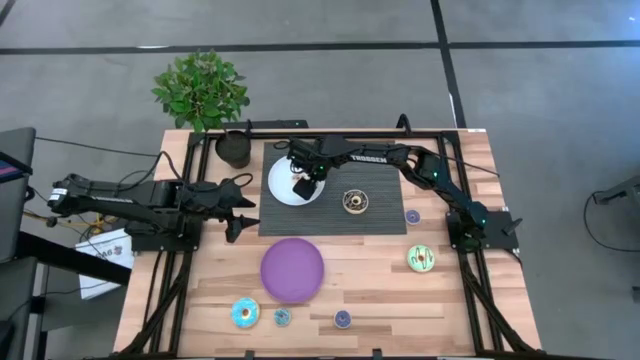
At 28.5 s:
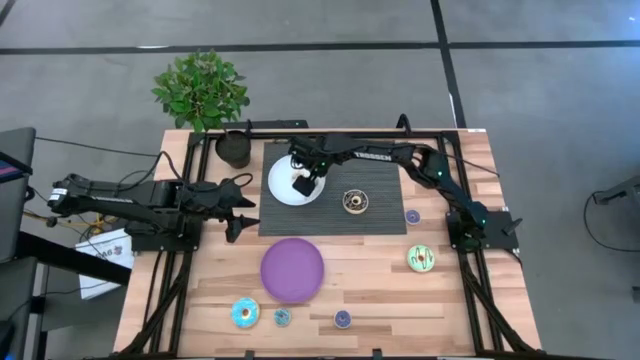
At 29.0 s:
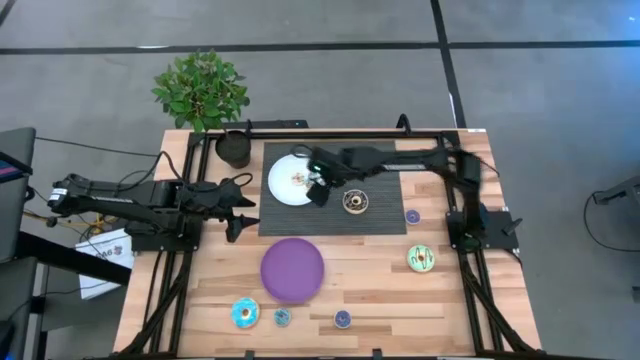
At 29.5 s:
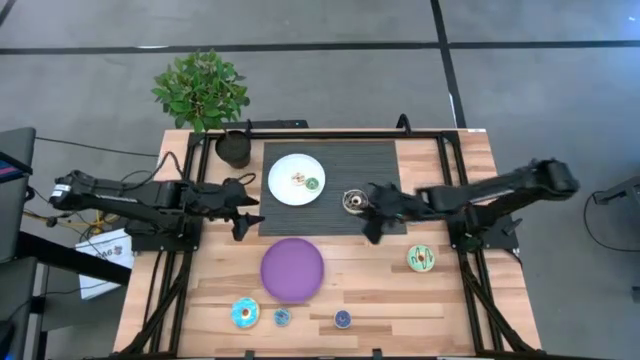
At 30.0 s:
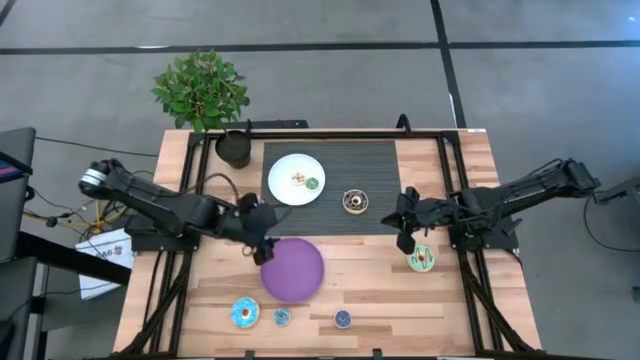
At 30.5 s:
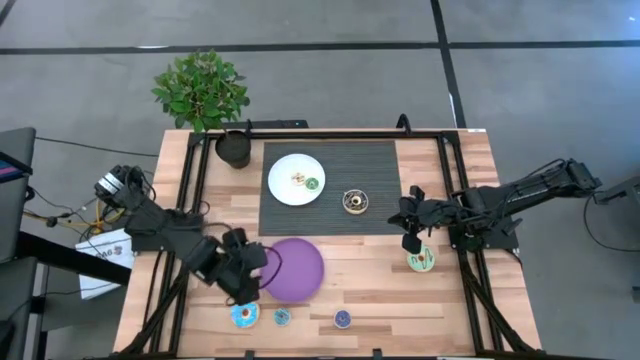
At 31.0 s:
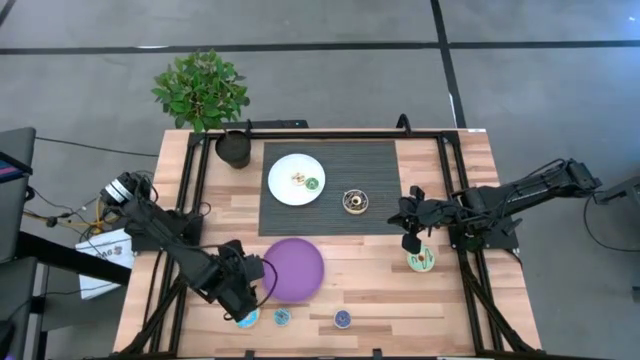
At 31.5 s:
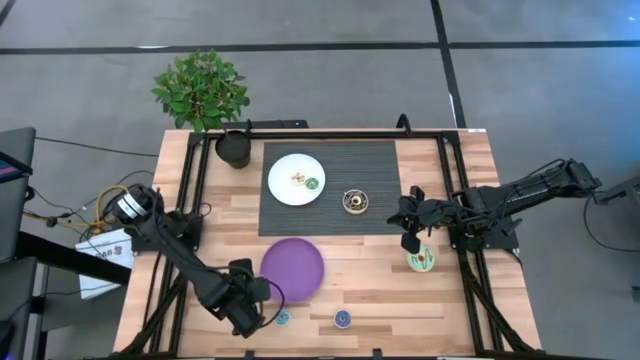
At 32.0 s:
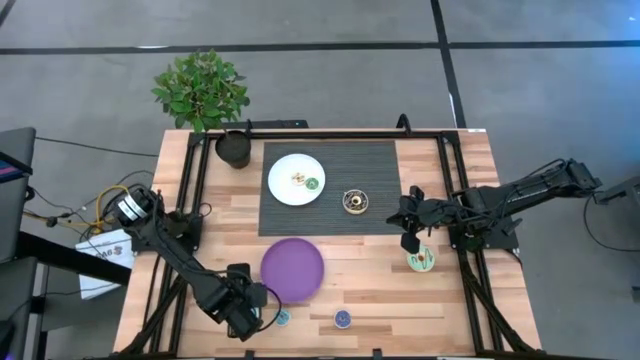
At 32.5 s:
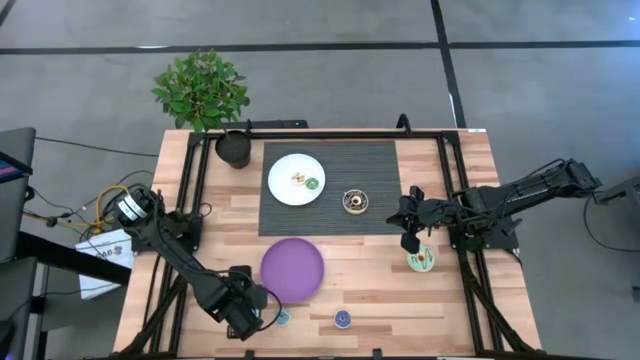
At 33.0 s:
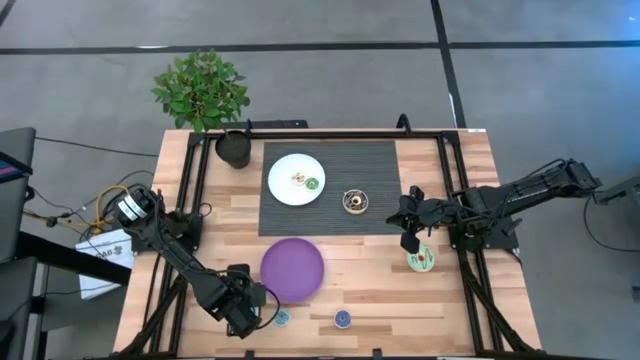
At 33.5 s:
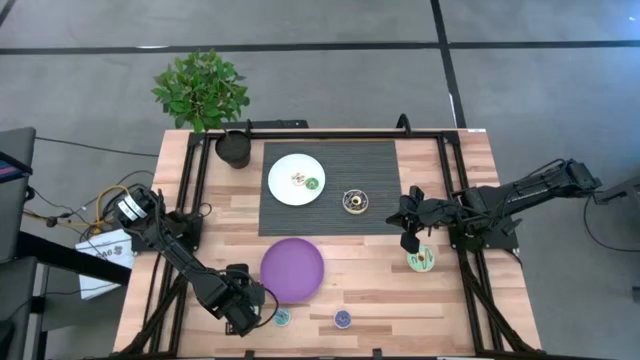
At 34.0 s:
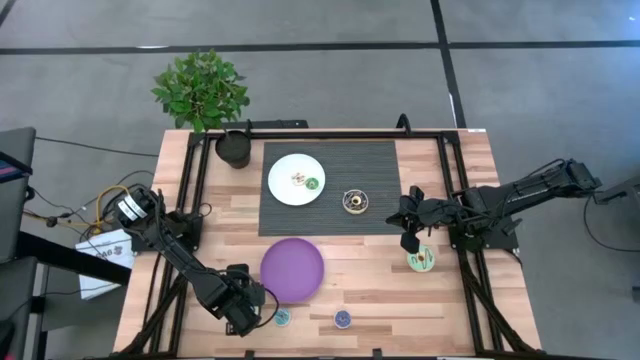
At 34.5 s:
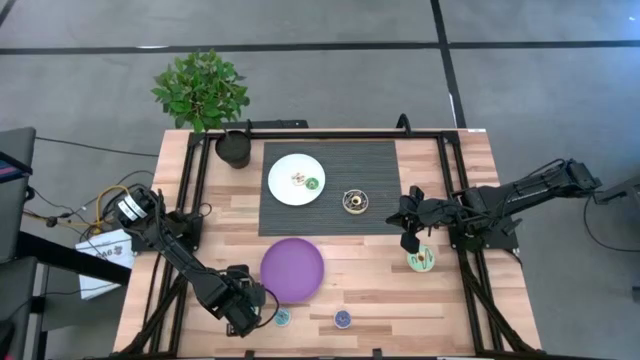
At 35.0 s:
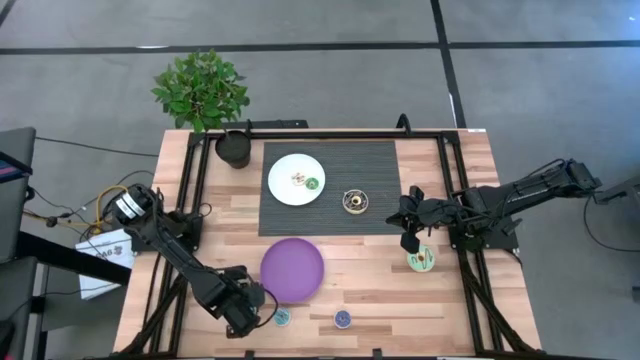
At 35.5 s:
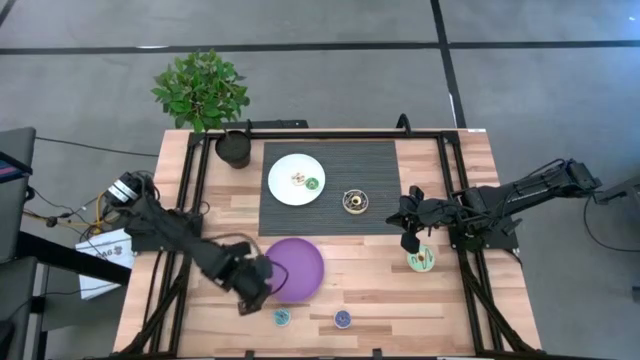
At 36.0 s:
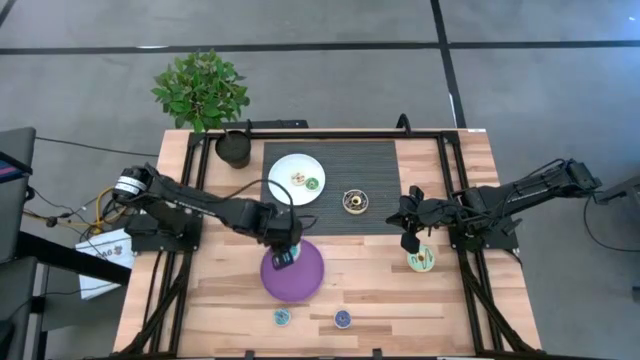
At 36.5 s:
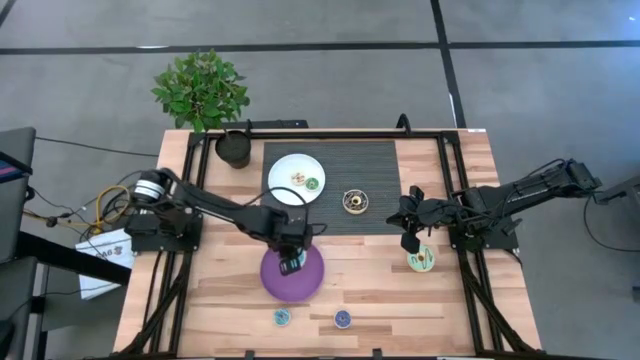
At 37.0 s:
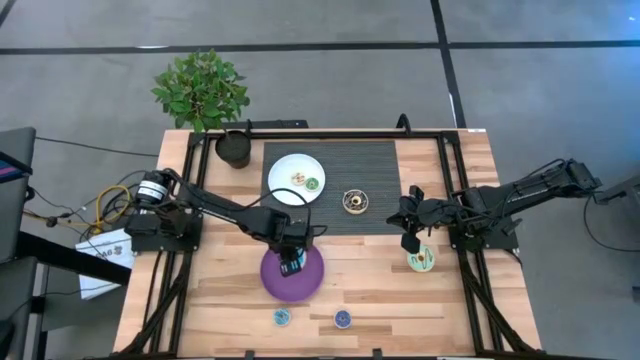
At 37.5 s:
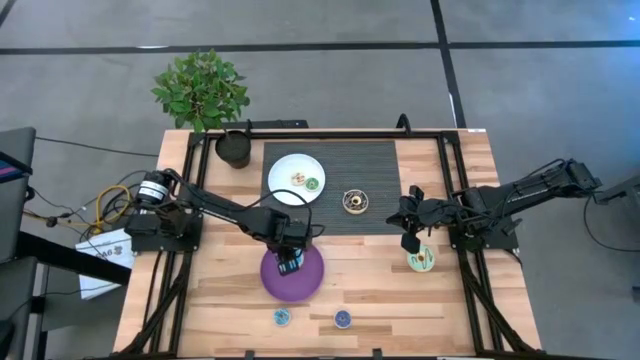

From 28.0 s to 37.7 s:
Task: Pick & Place donuts
Put the large light blue donut on the purple plate

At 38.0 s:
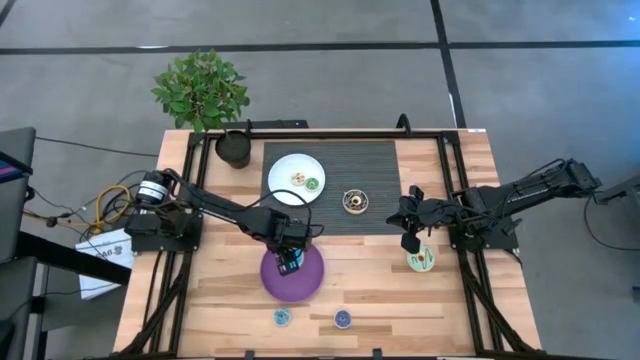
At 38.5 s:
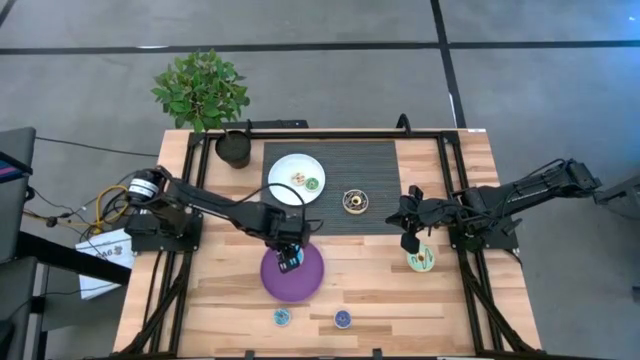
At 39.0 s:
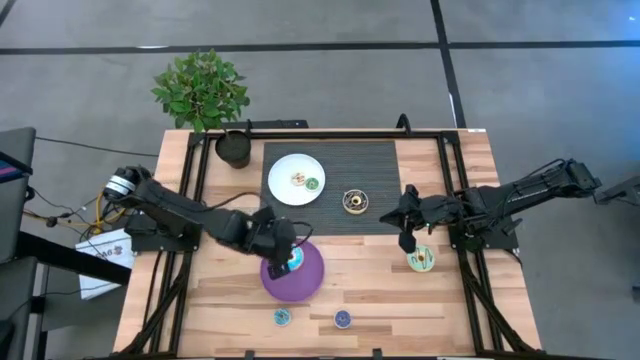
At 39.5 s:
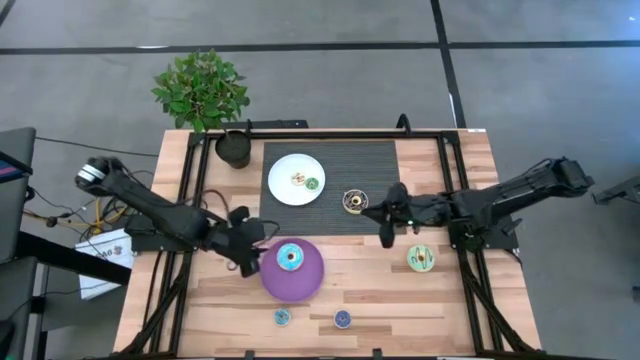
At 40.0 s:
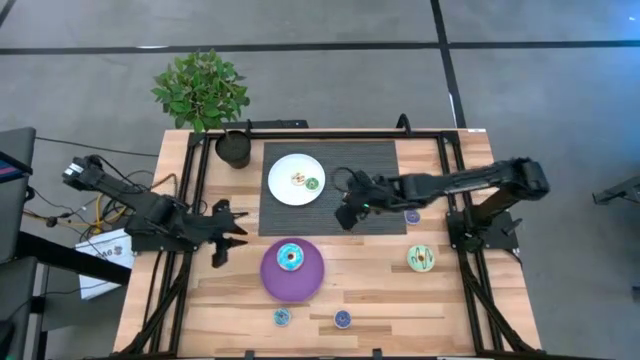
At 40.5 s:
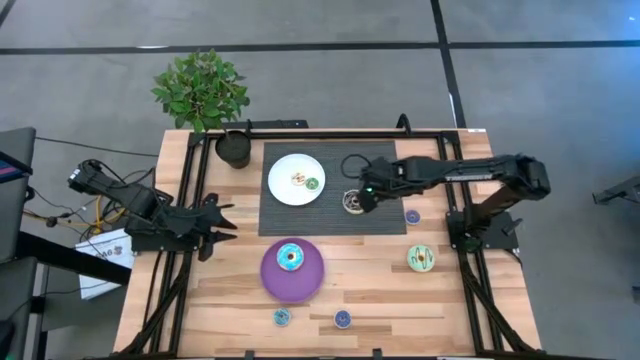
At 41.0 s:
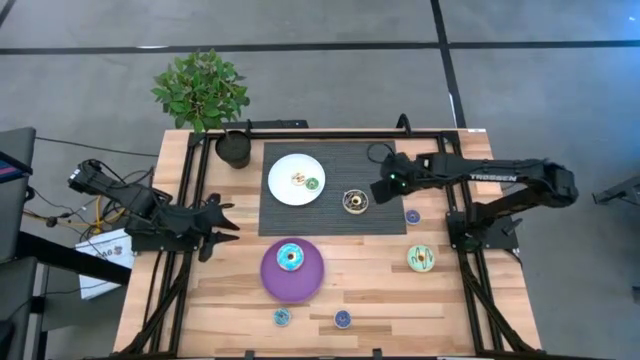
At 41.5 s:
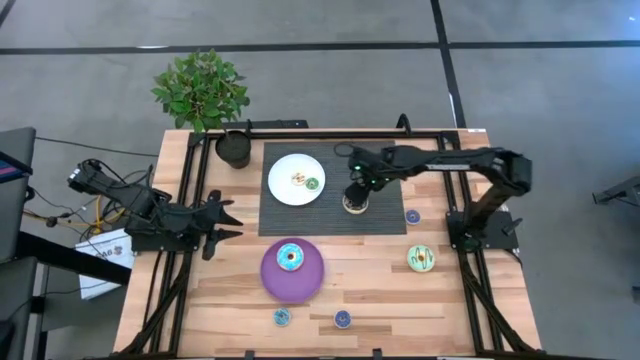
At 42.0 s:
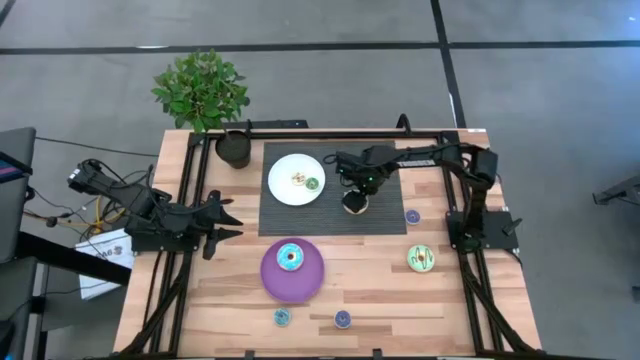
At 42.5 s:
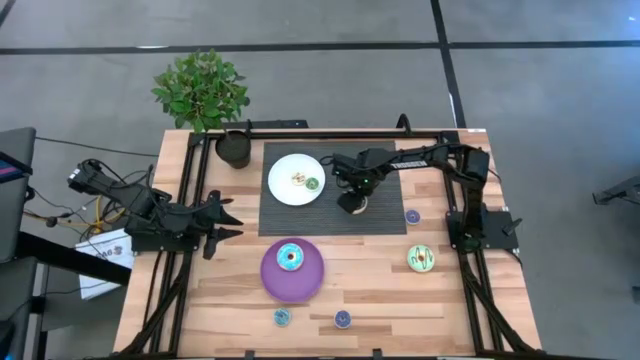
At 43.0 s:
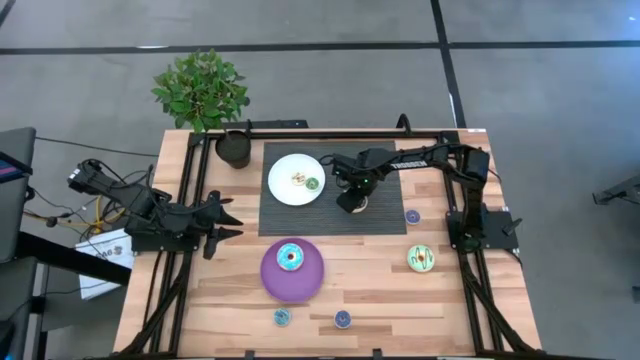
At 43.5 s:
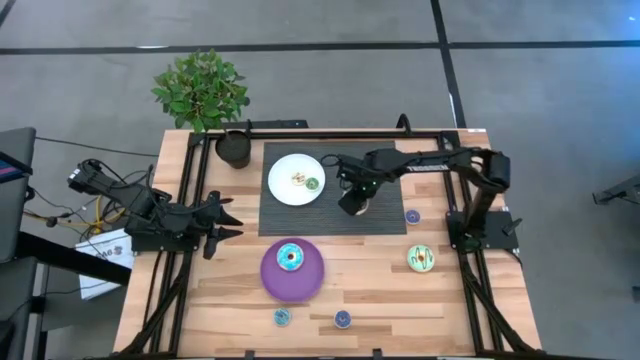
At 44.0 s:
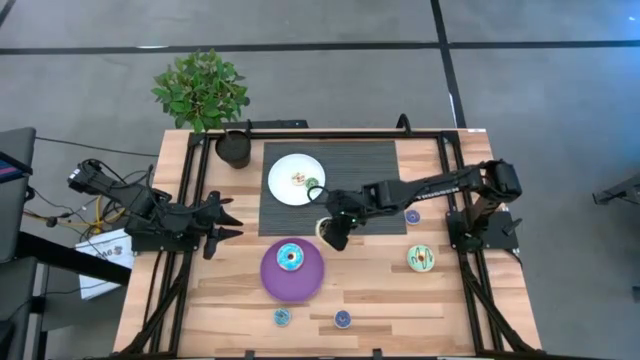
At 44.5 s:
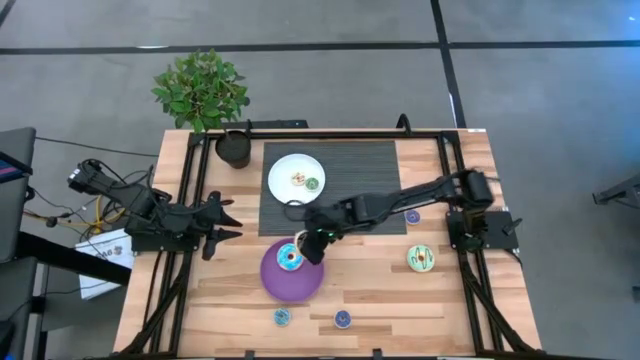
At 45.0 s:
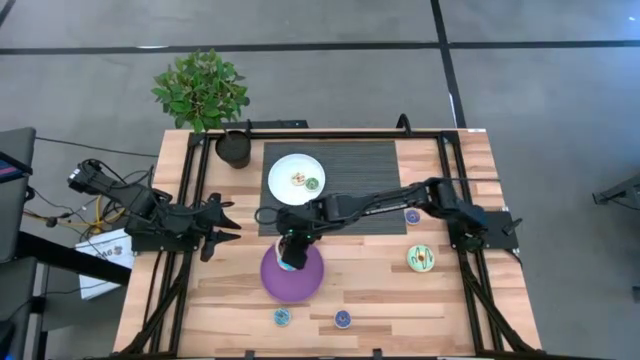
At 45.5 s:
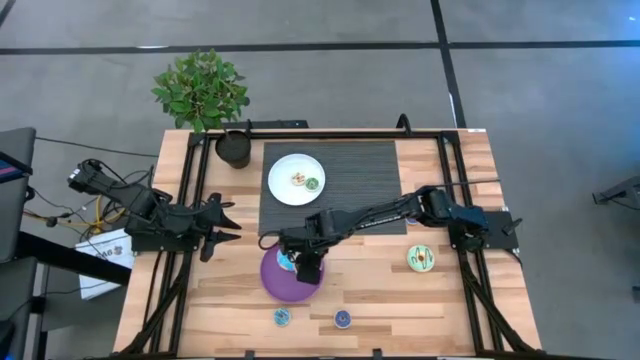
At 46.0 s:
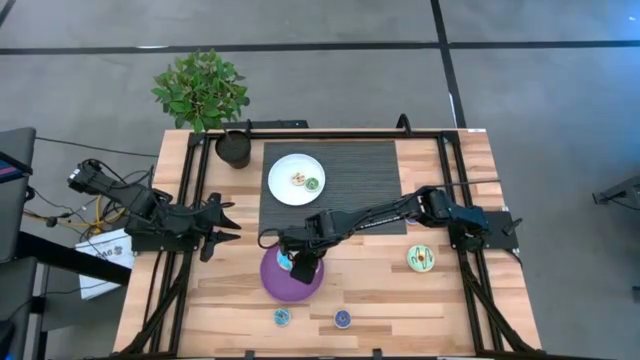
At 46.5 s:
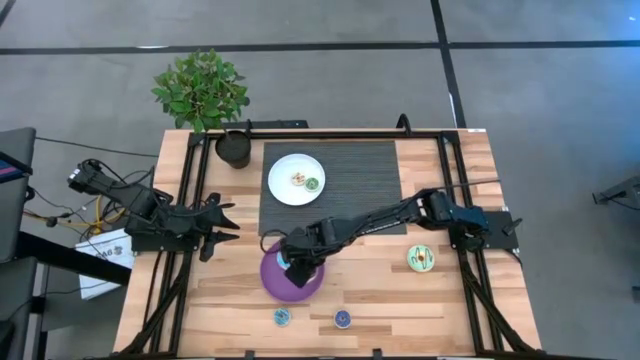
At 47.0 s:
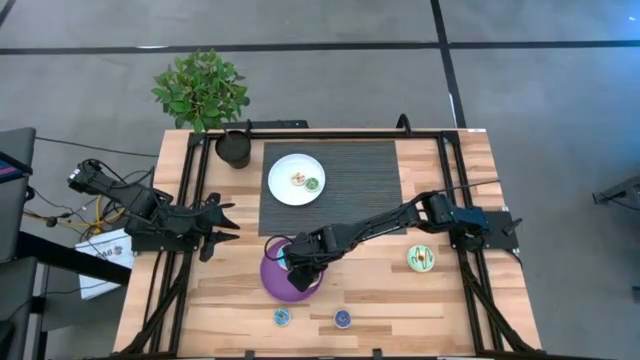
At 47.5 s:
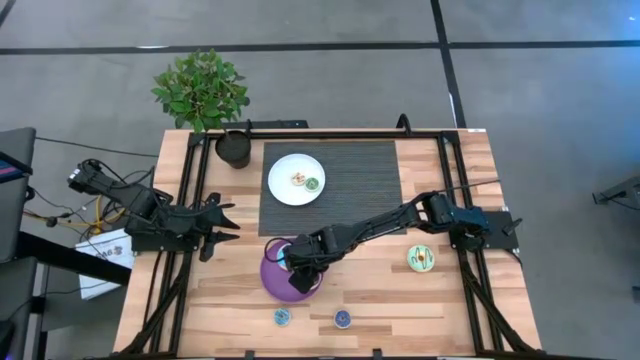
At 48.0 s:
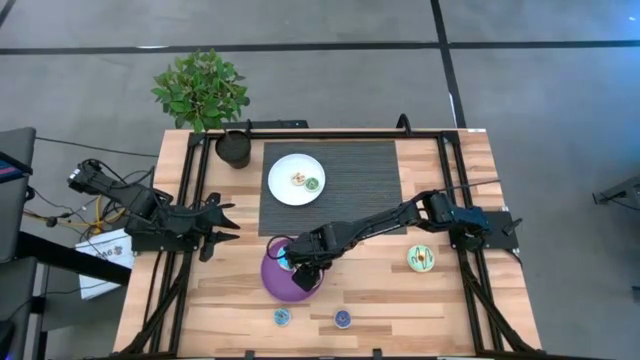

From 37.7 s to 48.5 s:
Put the large black donut on the purple plate
